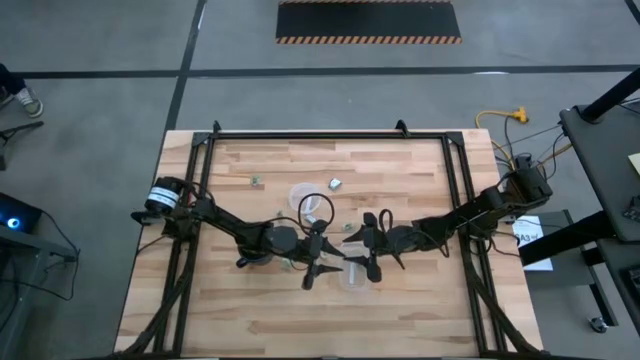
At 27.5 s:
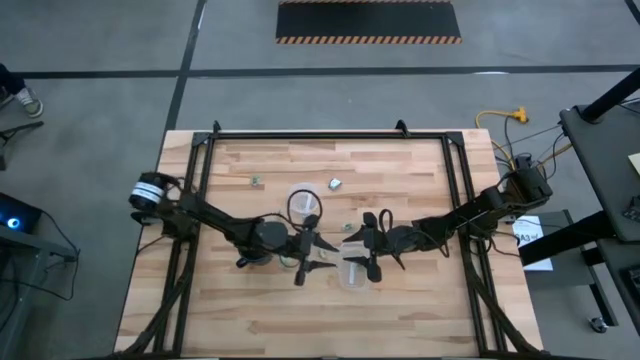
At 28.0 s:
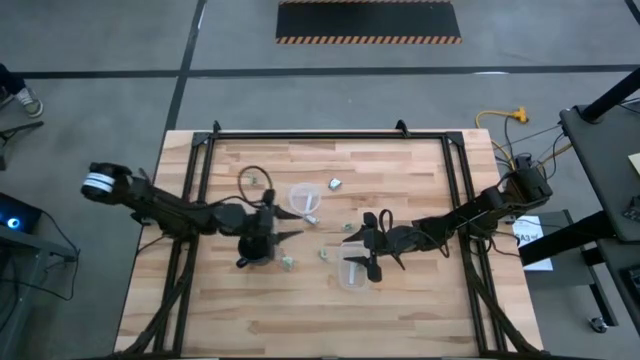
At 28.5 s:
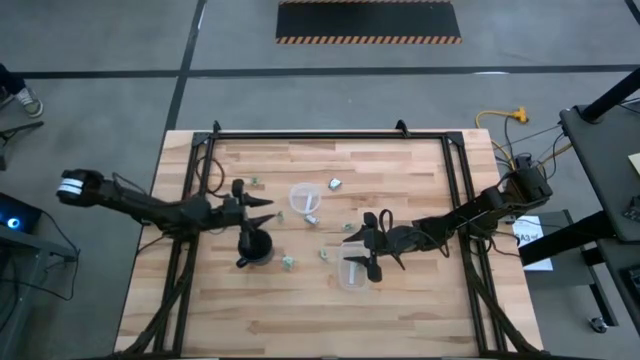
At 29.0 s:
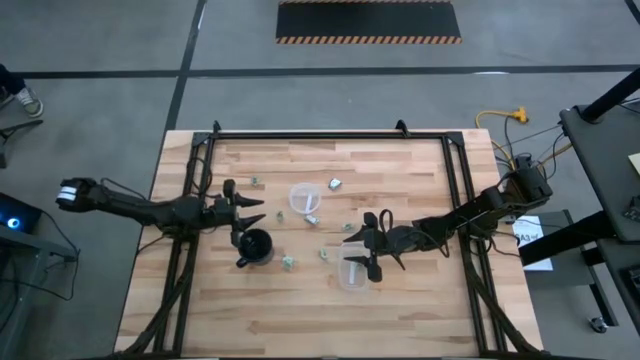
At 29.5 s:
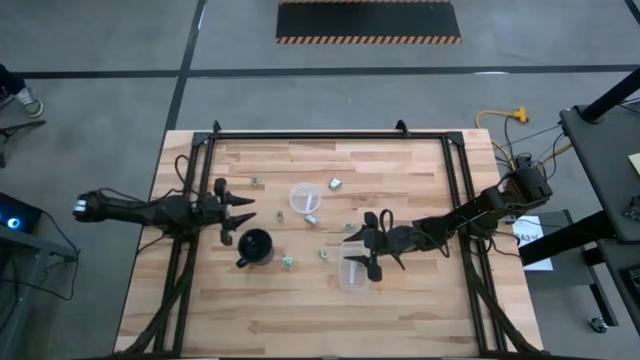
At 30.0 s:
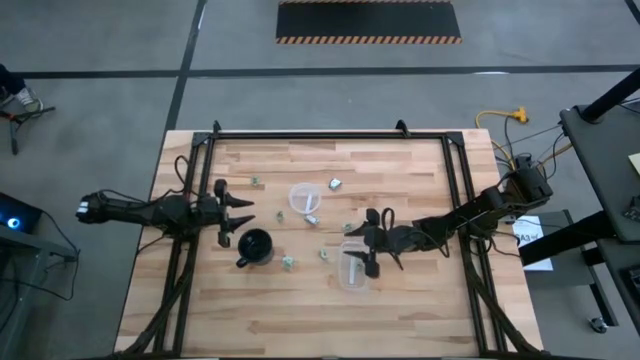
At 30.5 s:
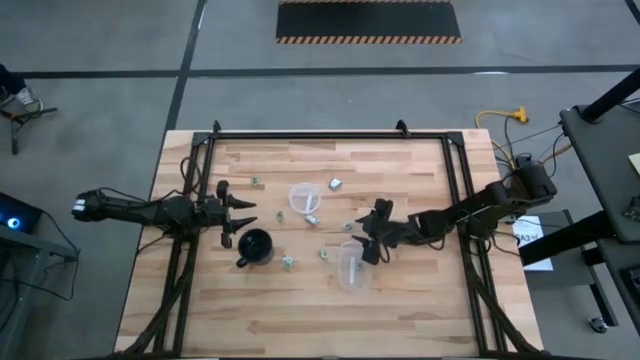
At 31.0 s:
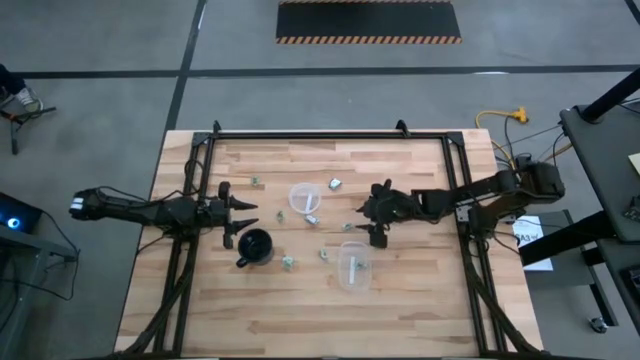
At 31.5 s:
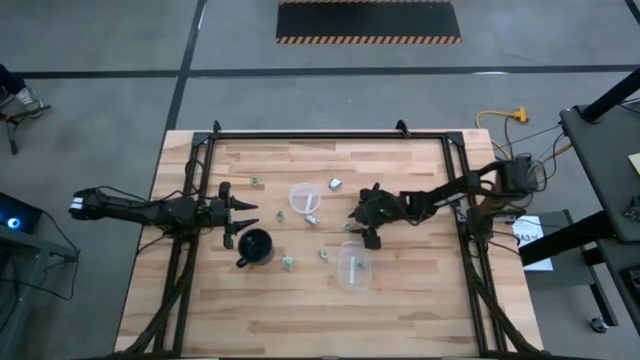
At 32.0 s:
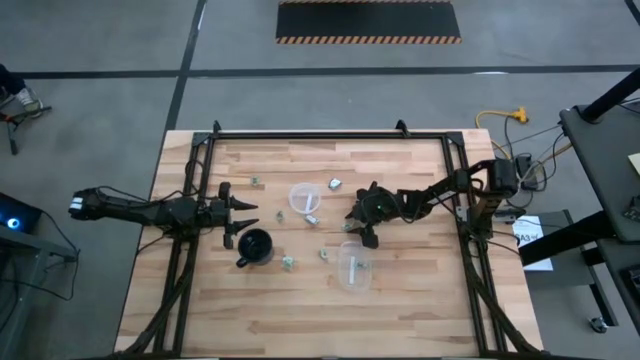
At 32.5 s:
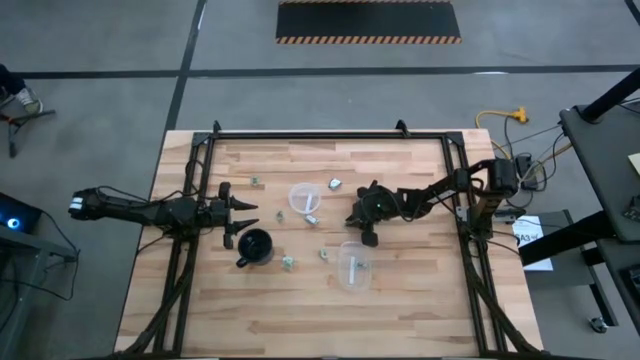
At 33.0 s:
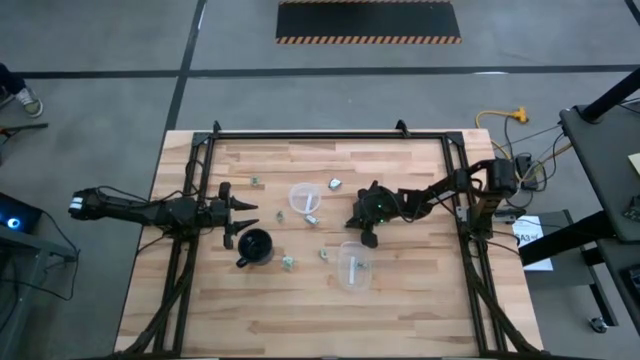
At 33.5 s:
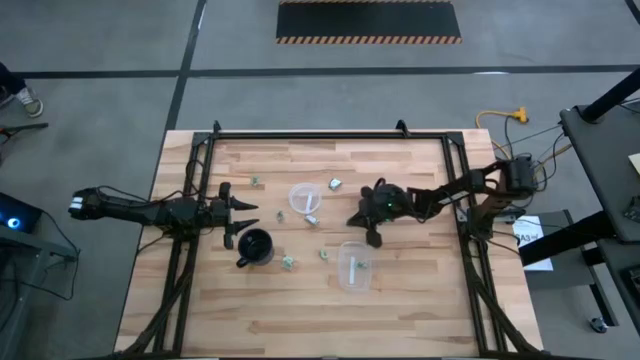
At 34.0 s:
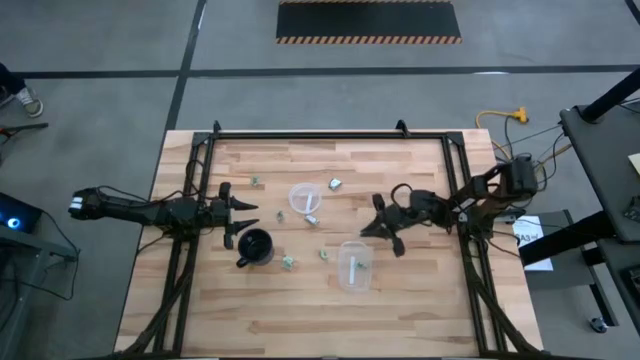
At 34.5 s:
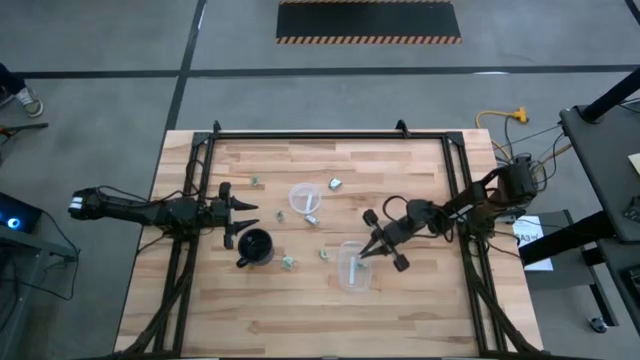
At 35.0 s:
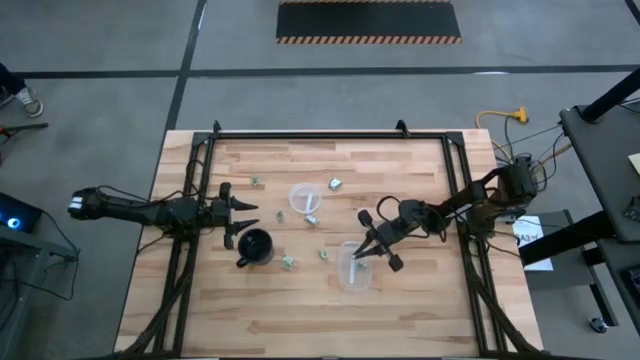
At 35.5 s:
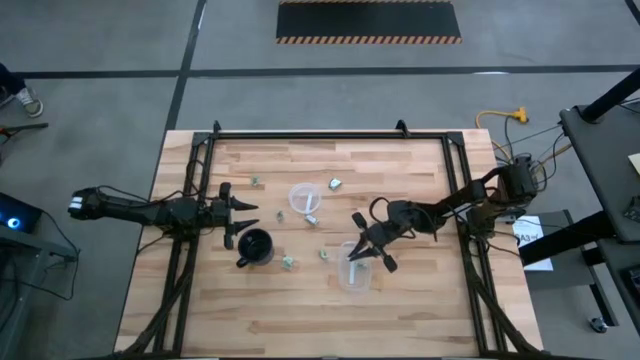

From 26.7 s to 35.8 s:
Task: Pick and place items into bin
Put the stevia packet into the rectangular transparent bin

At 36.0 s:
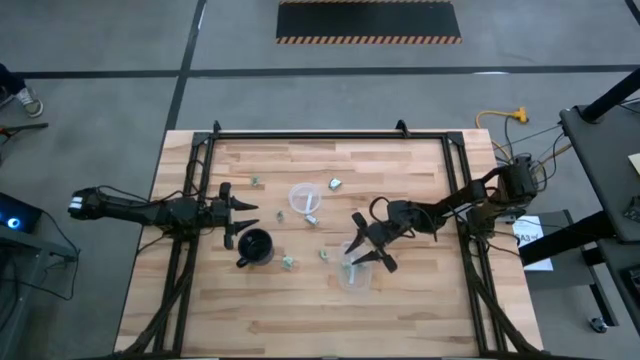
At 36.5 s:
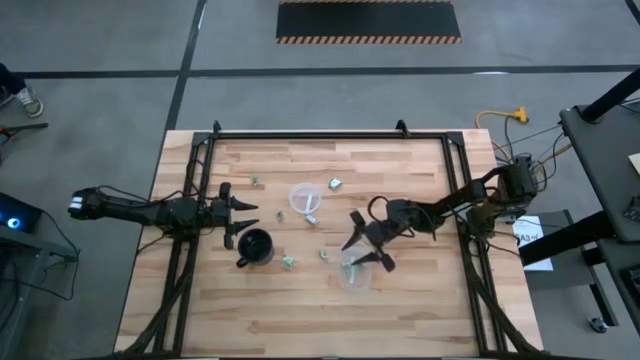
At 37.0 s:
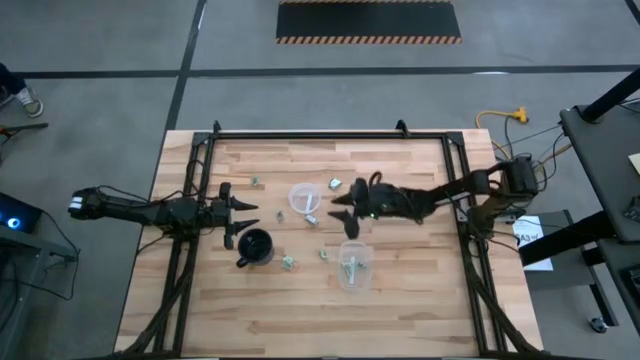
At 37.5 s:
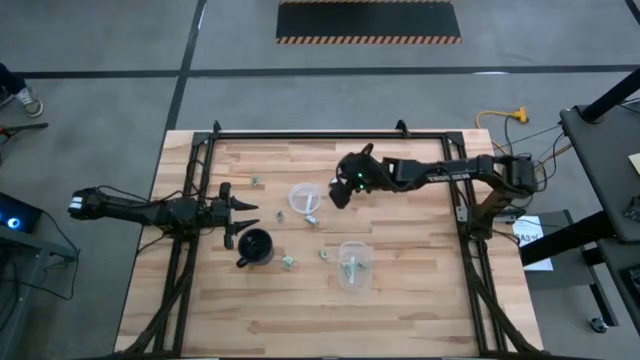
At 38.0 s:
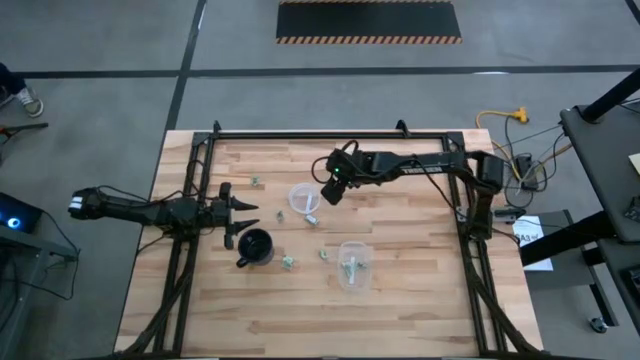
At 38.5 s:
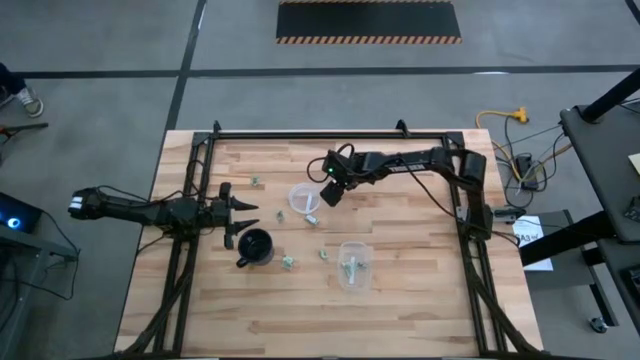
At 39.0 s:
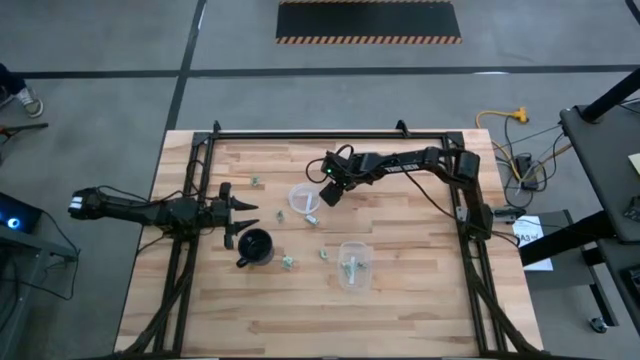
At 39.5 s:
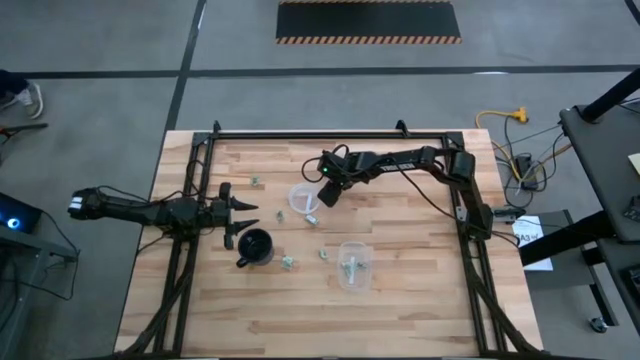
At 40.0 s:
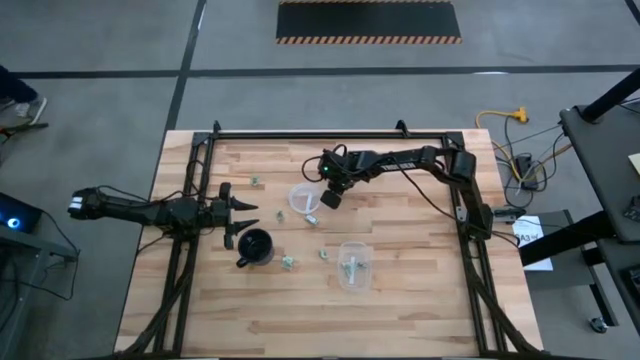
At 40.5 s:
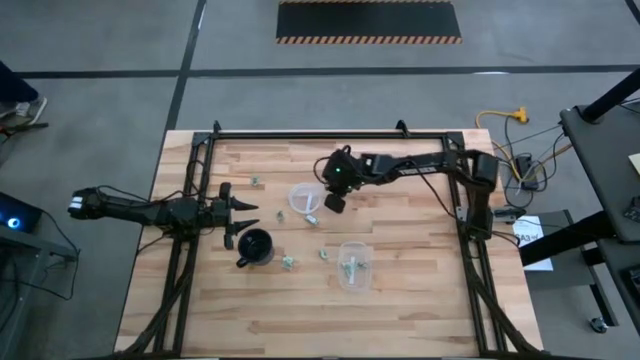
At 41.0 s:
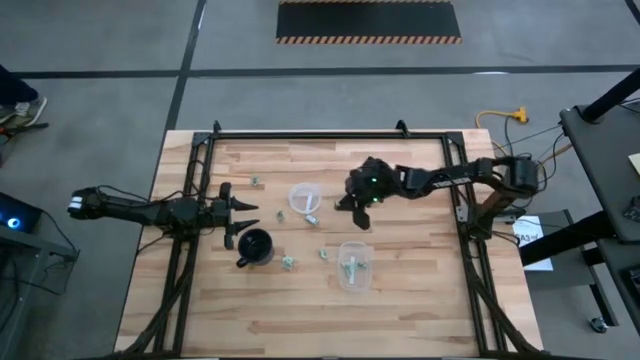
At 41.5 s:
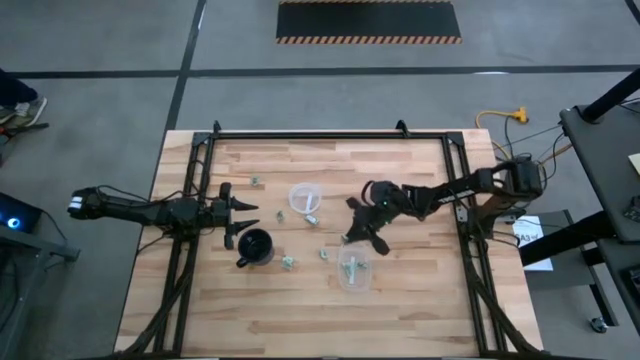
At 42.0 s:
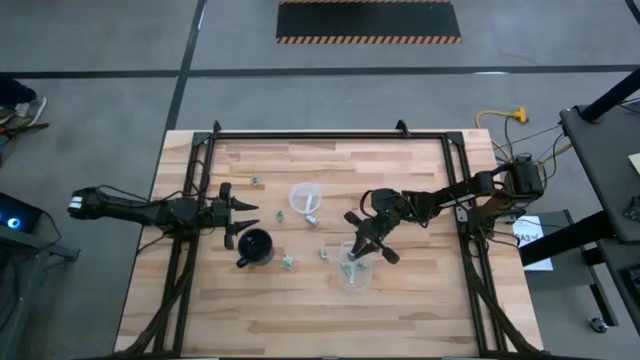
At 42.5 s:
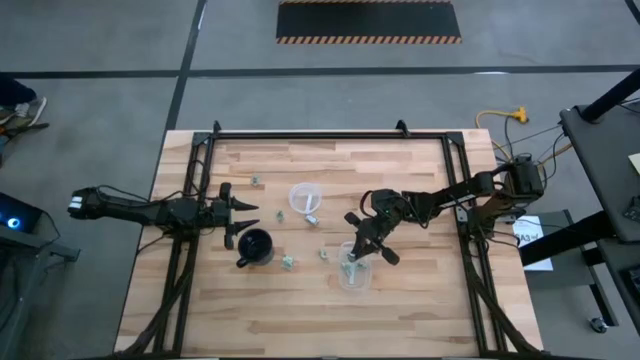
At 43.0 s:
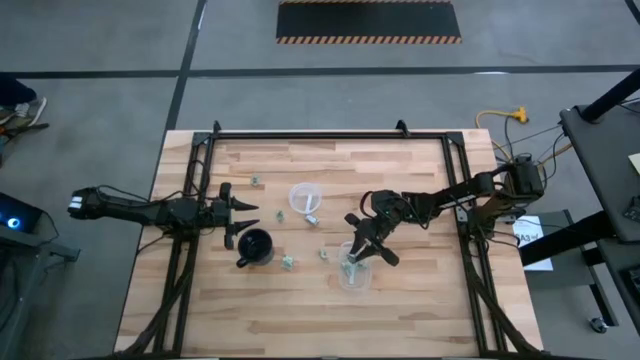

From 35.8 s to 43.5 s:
Put the stevia packet into the rectangular transparent bin

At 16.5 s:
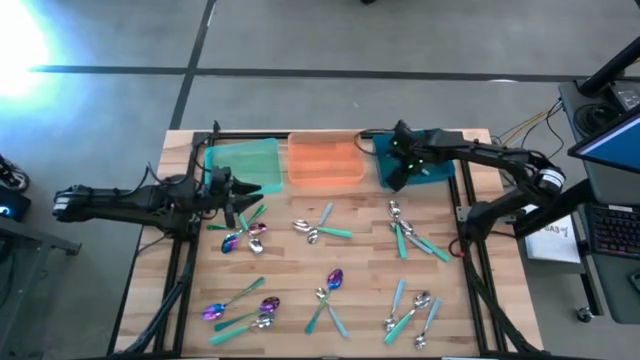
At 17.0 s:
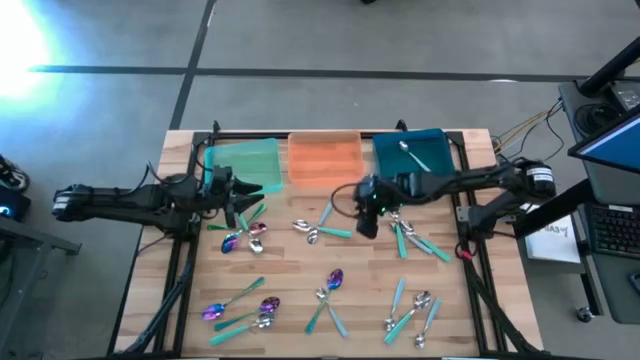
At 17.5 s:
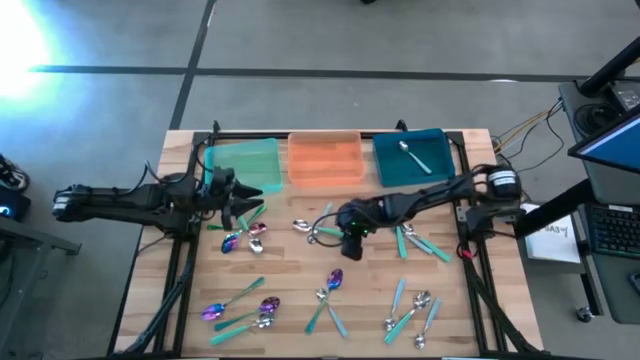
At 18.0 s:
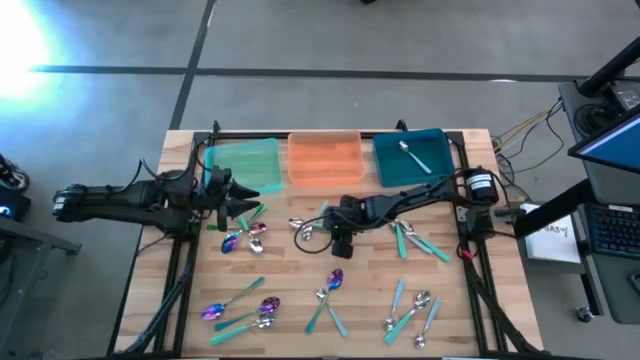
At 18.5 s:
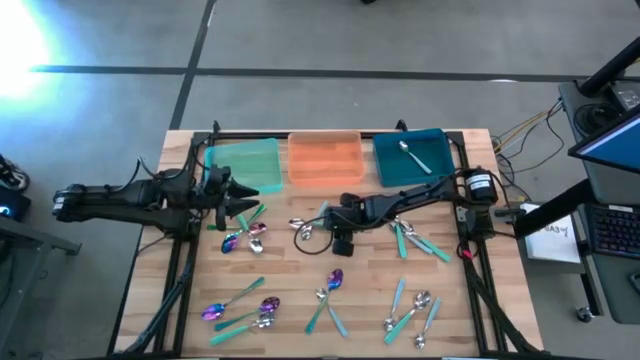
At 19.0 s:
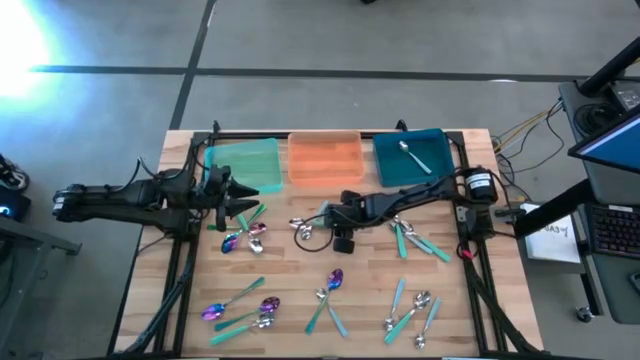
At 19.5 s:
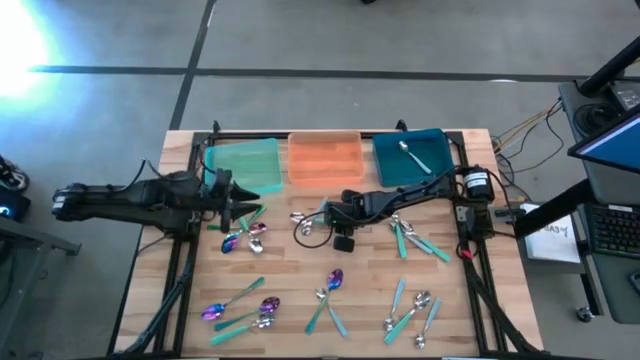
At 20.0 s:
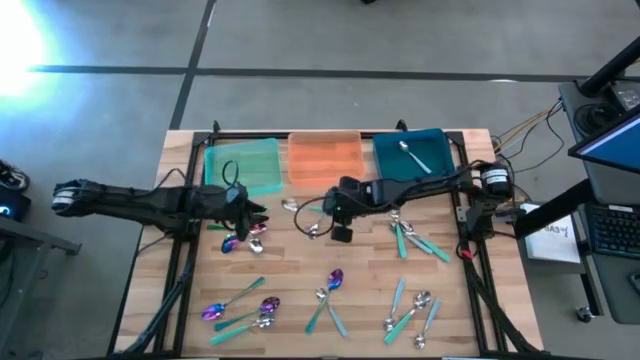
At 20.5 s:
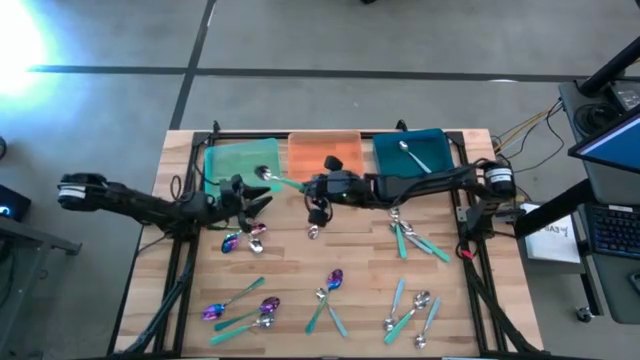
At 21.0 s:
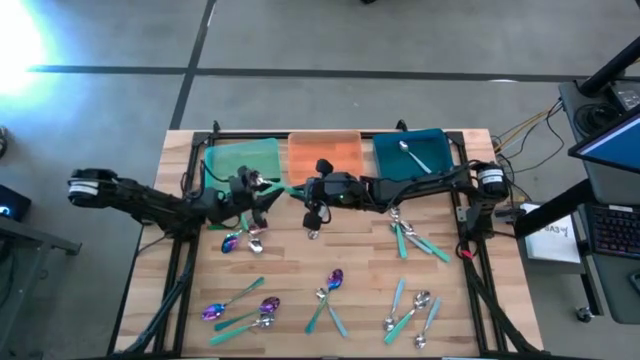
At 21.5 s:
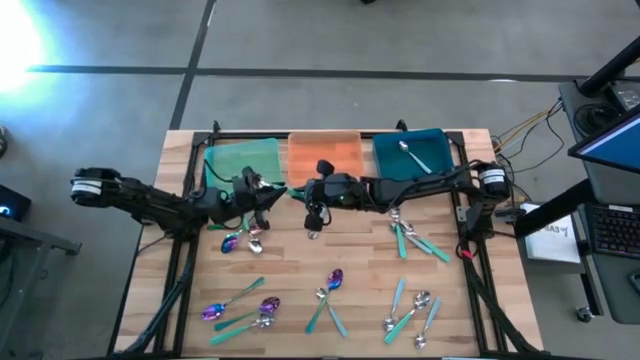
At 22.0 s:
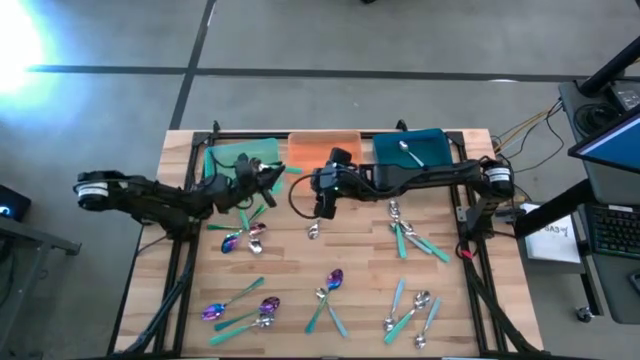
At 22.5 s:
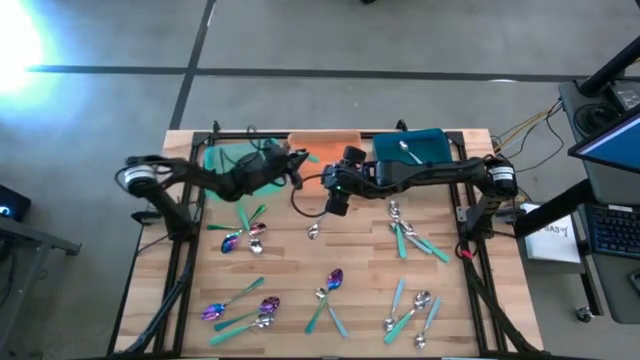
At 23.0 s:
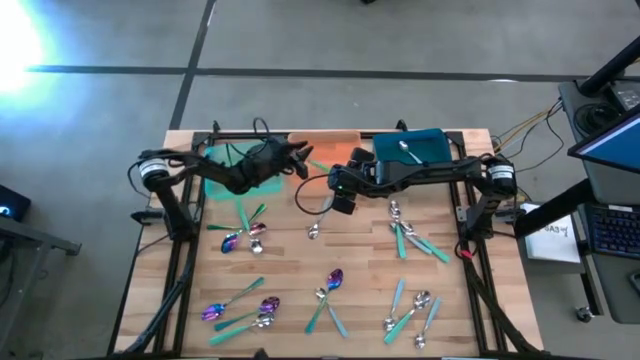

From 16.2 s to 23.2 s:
Task: Sort silverware by color (type)
Put the green spoon into the orange bin
